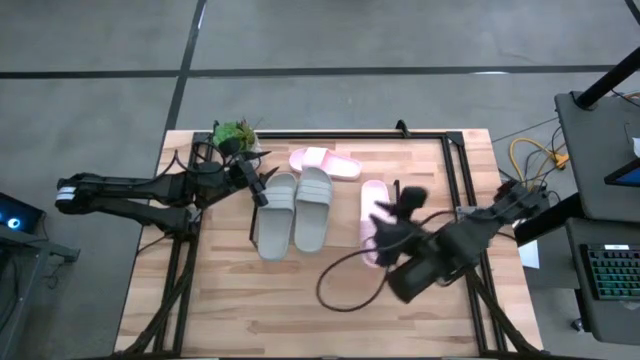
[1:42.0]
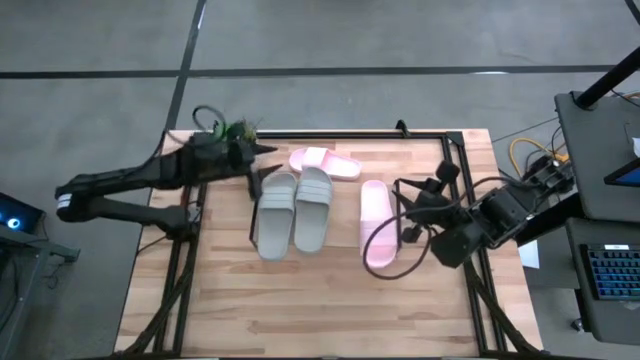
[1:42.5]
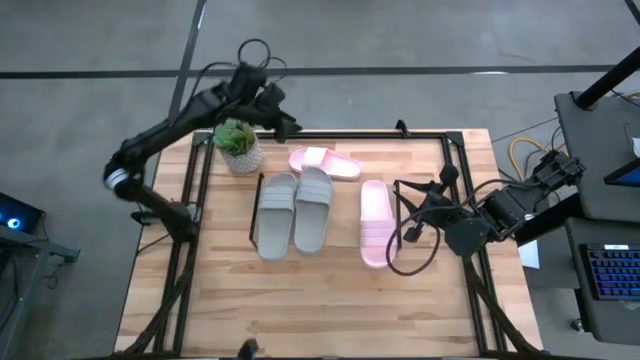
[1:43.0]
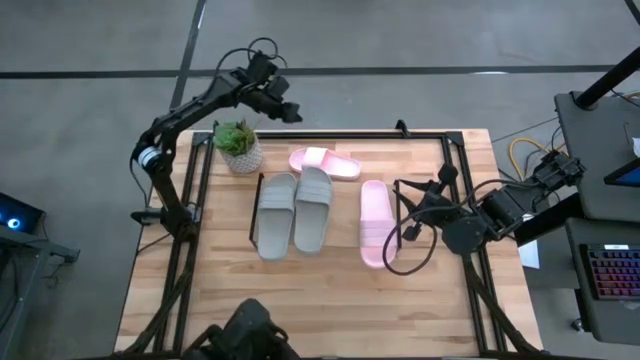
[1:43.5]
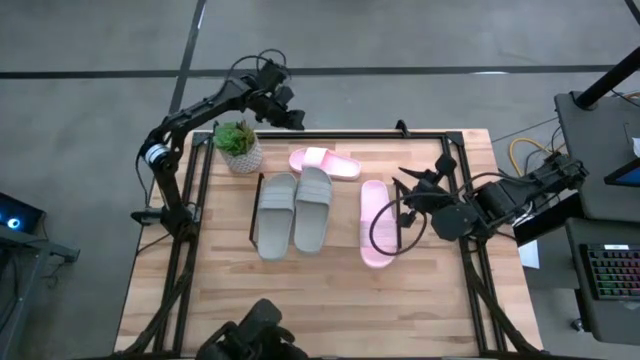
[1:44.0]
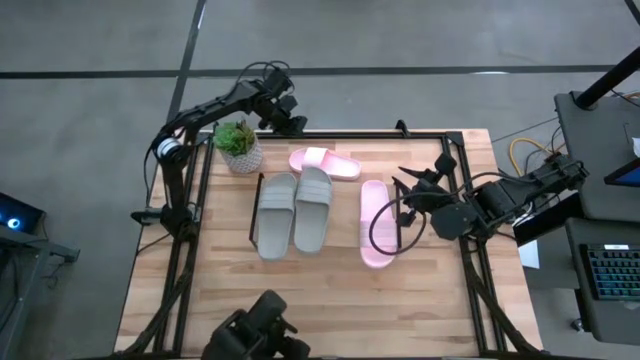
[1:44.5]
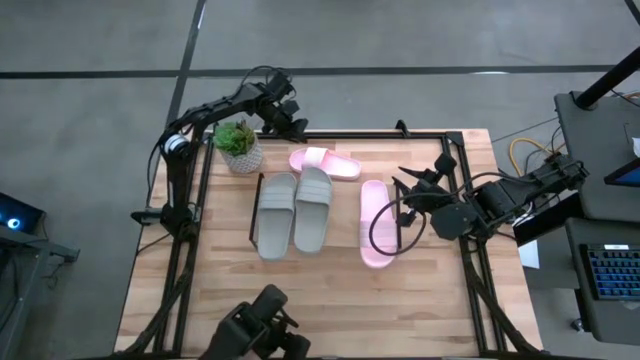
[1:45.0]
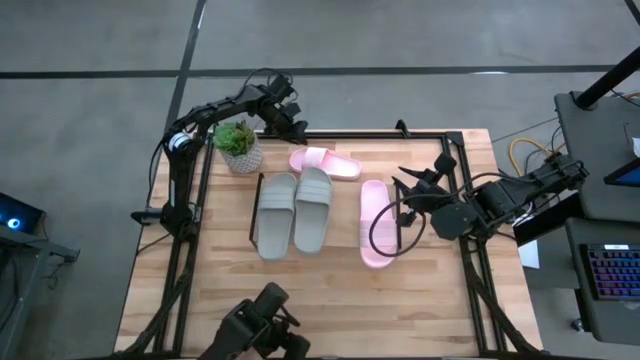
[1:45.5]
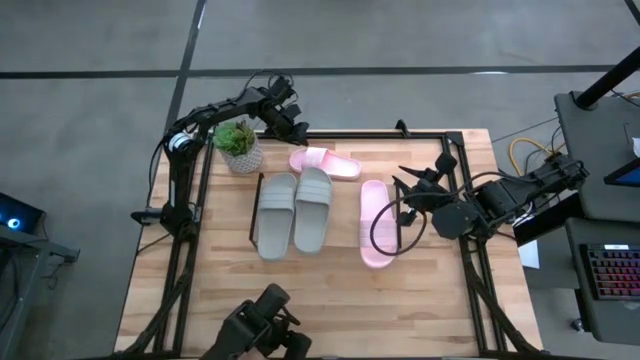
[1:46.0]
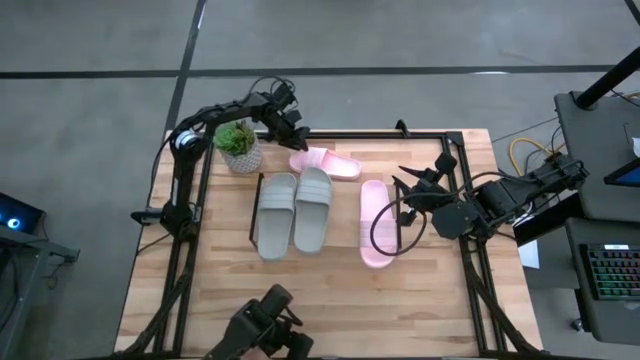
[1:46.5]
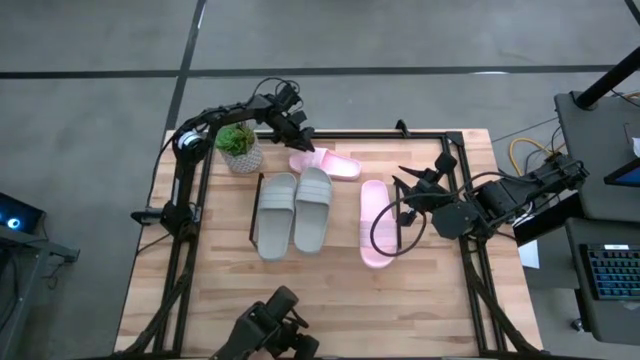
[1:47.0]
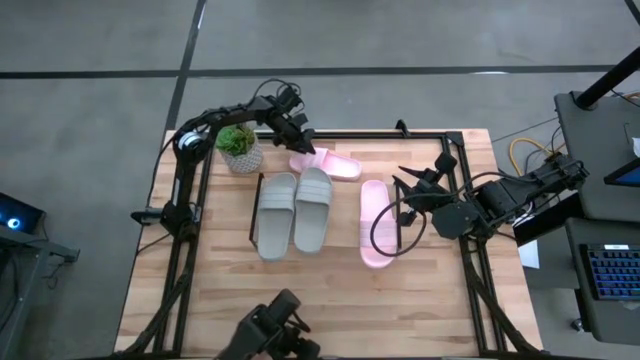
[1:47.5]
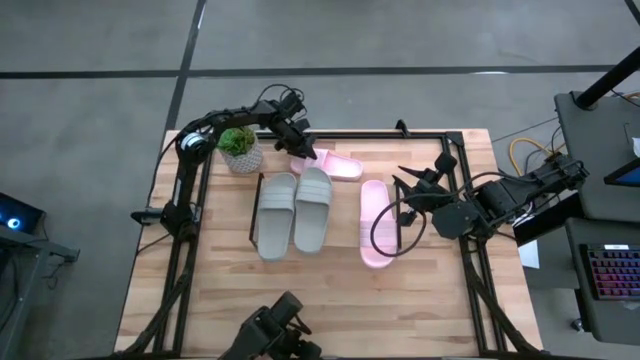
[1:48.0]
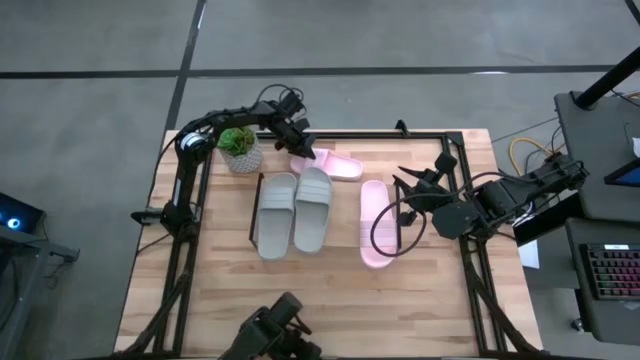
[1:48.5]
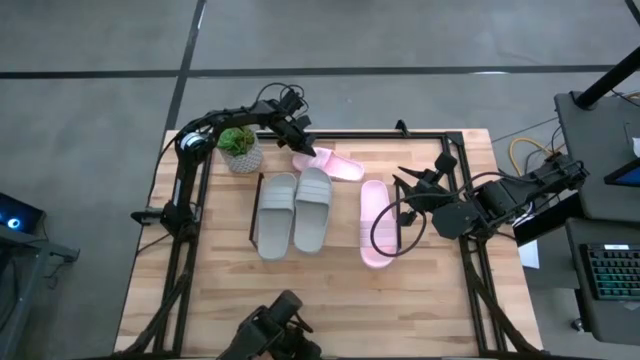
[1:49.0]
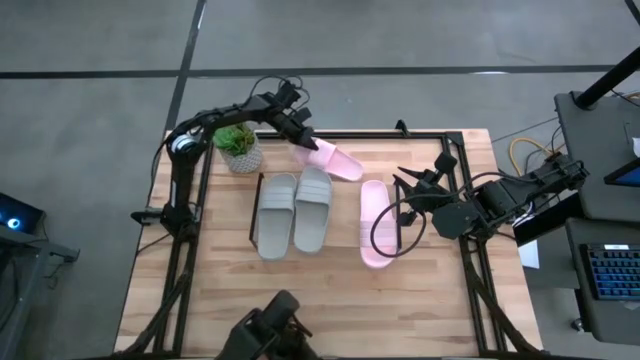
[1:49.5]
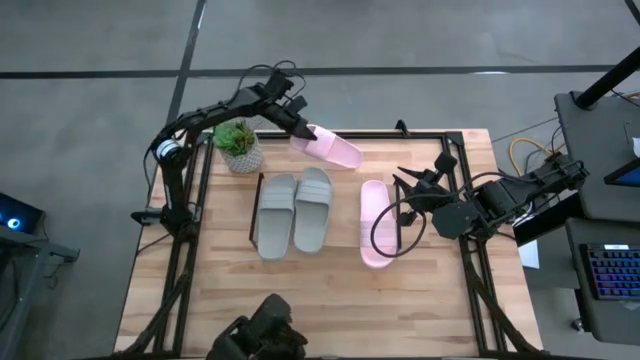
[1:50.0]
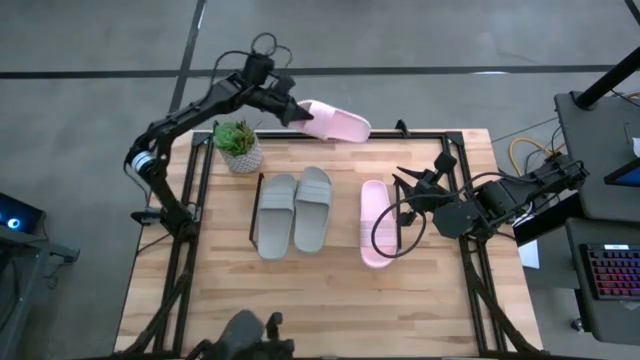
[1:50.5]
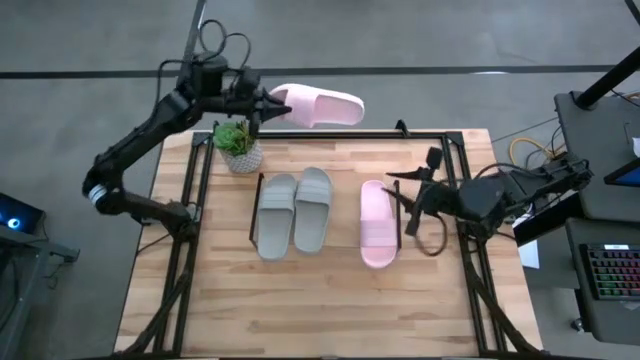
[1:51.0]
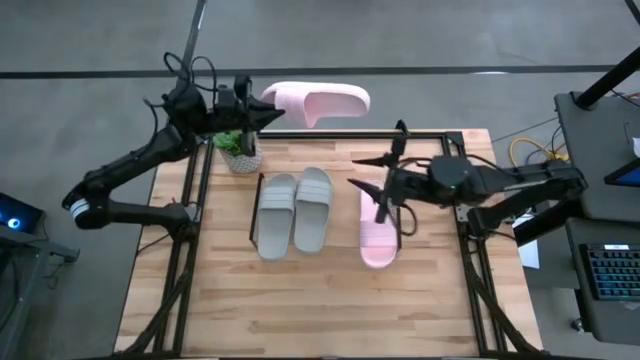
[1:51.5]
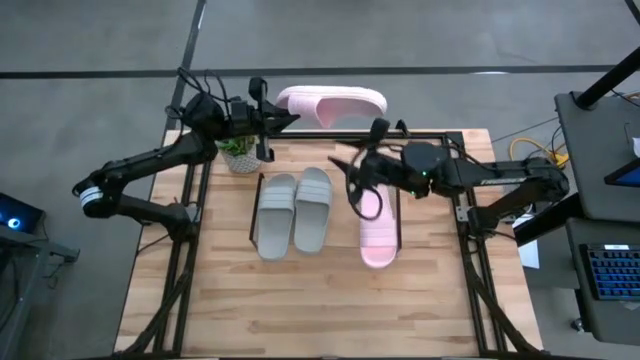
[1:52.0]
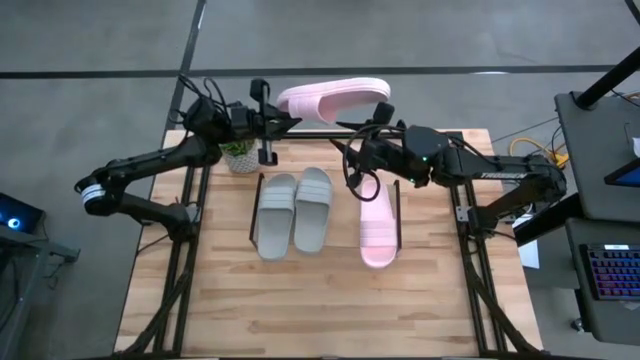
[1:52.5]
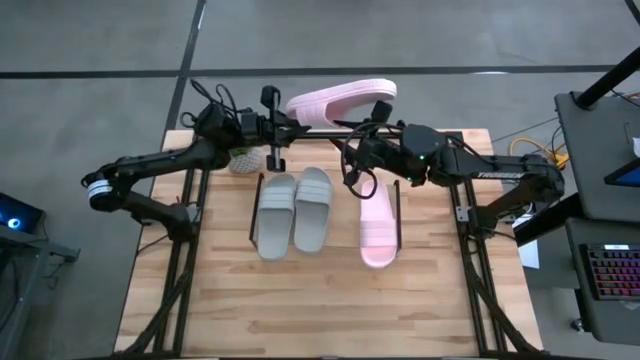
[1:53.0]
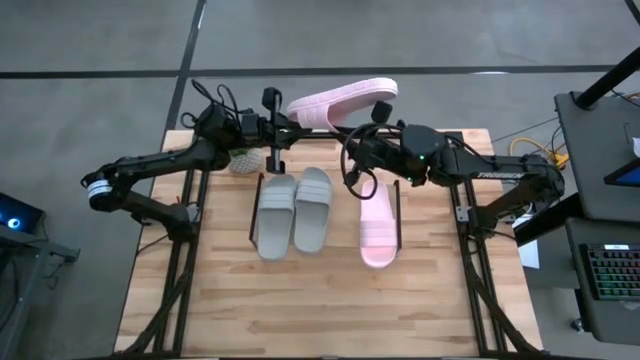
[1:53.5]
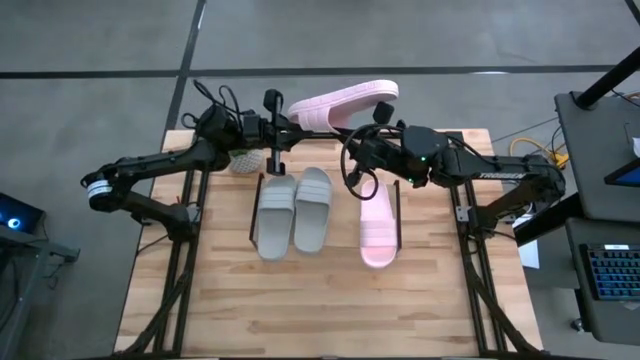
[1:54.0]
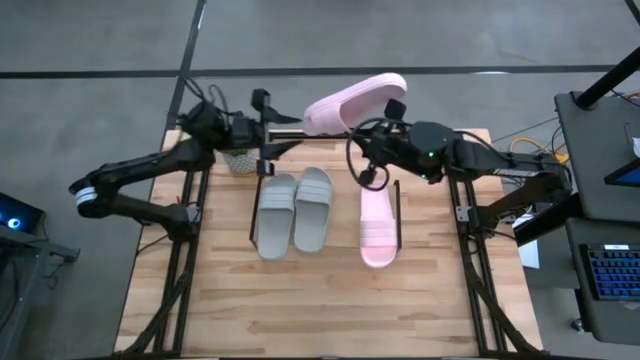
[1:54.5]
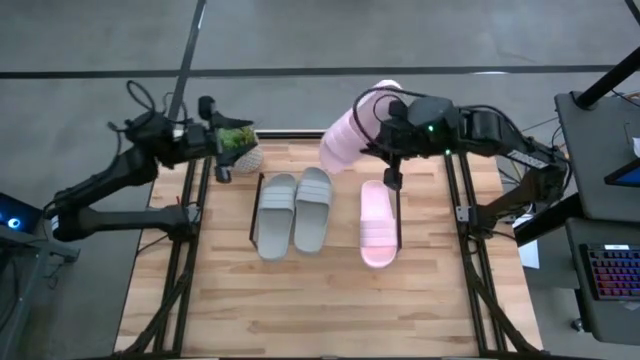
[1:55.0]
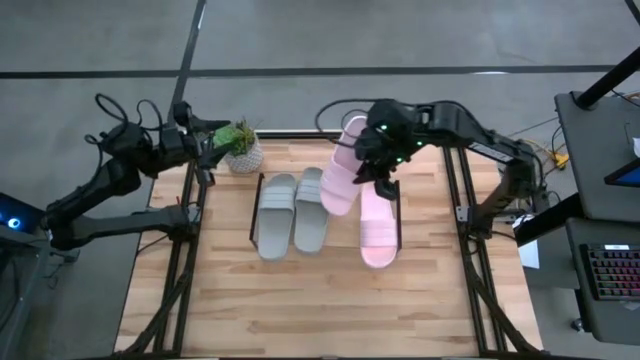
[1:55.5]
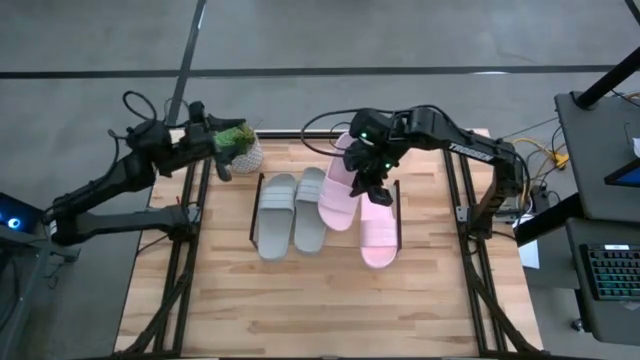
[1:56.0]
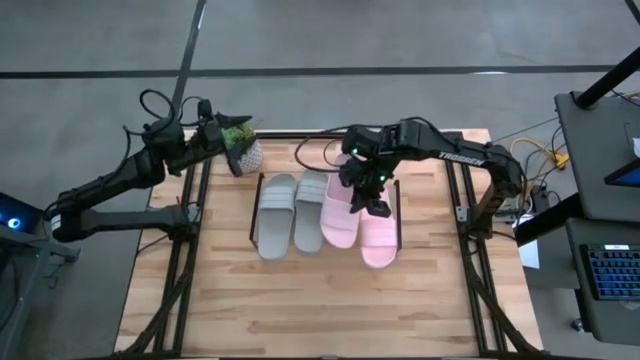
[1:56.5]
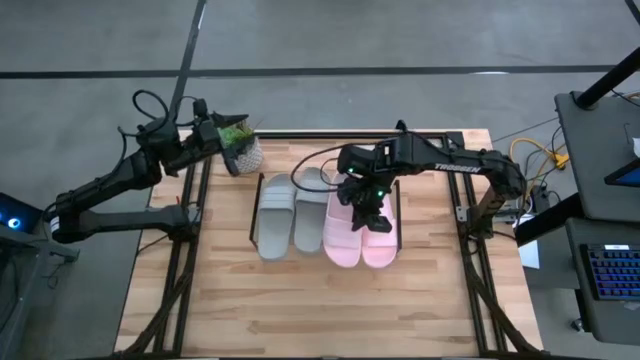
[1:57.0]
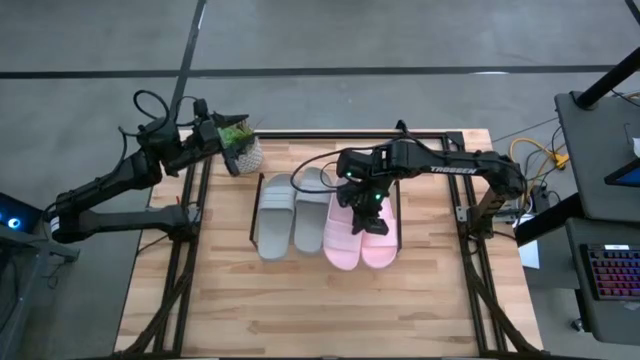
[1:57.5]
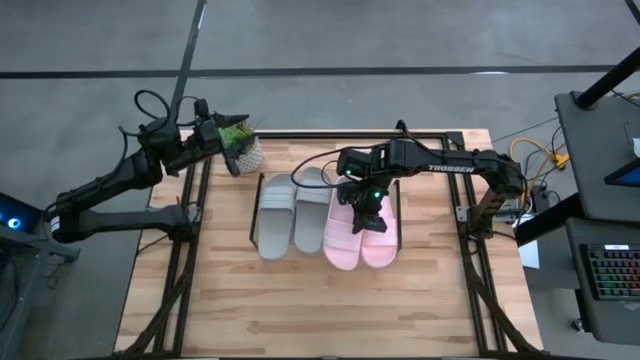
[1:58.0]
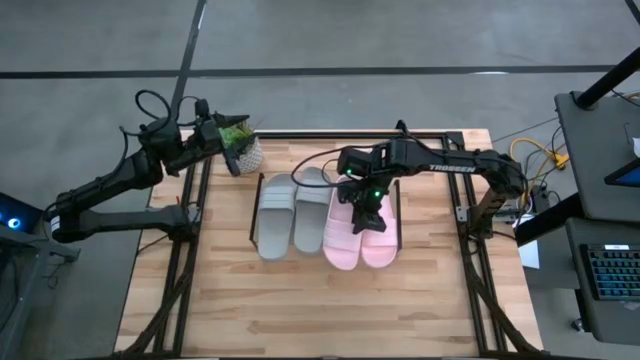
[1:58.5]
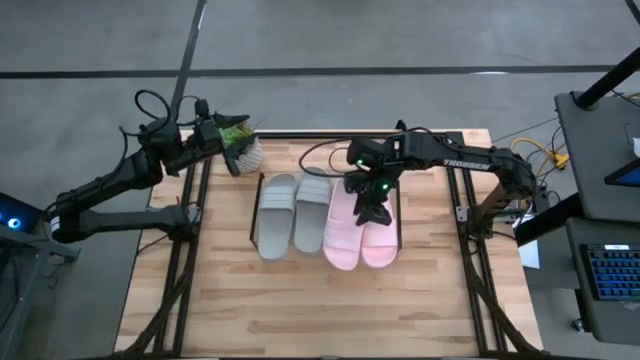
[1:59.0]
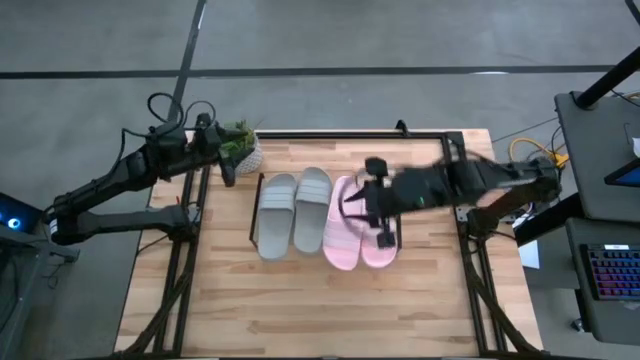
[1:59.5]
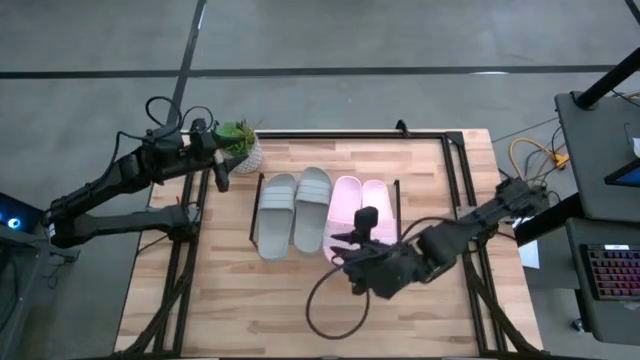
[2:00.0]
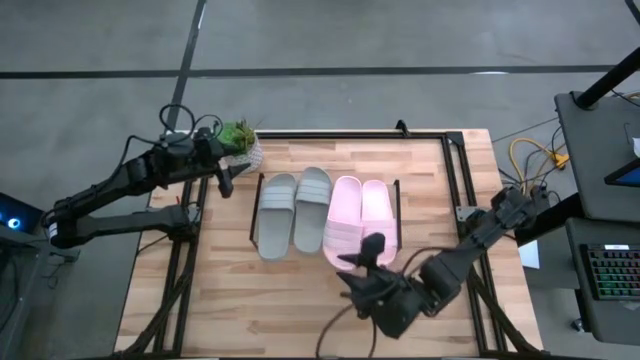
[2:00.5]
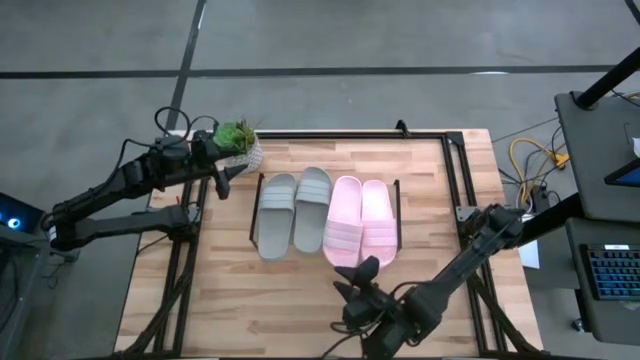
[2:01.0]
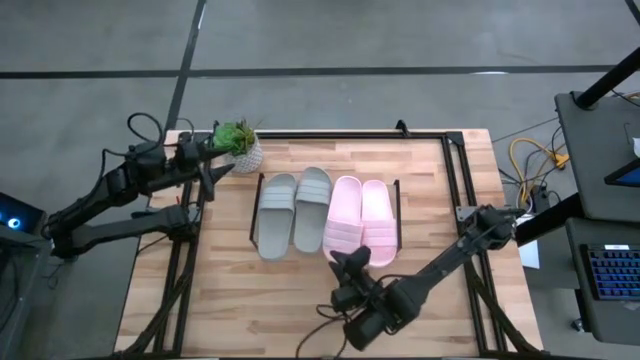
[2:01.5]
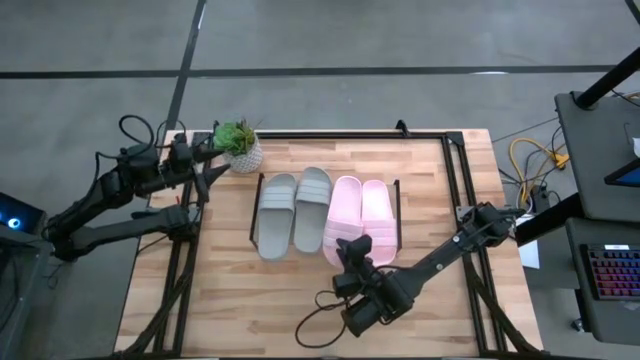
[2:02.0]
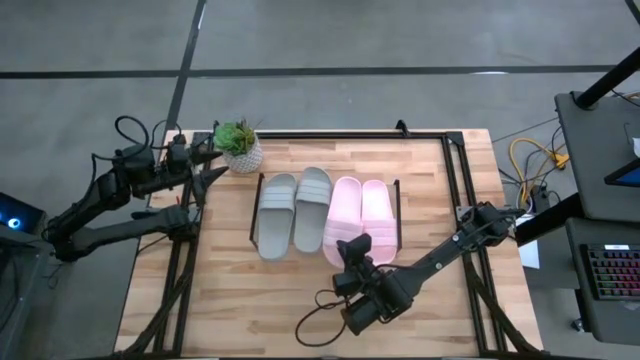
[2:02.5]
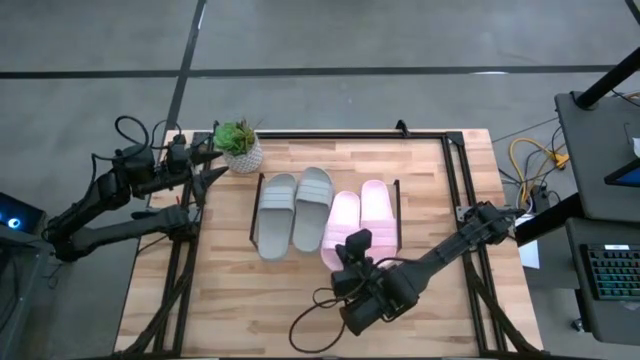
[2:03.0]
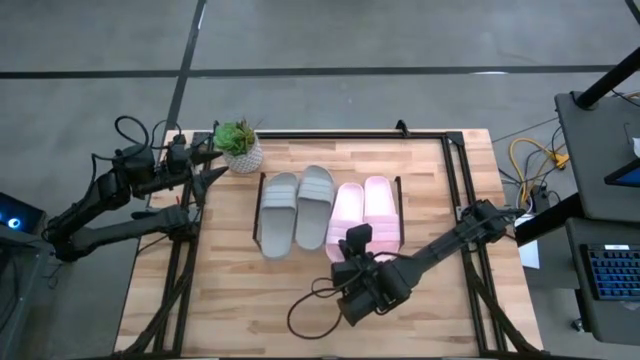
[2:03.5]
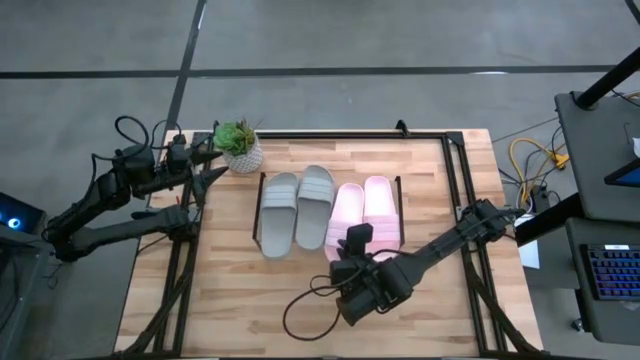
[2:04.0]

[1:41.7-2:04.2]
Task: Pick and place slides into the shelf
Put the pink slide on the shelf
